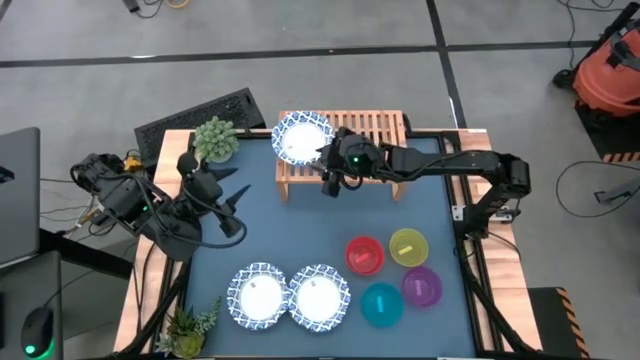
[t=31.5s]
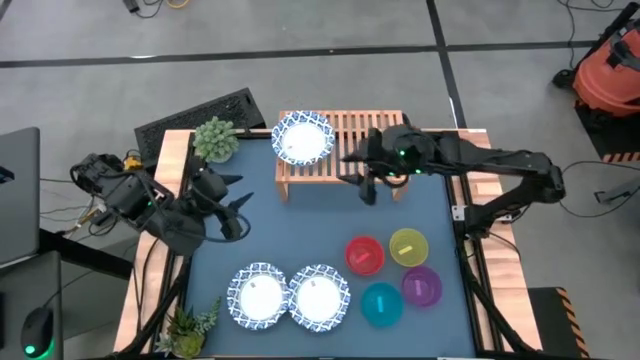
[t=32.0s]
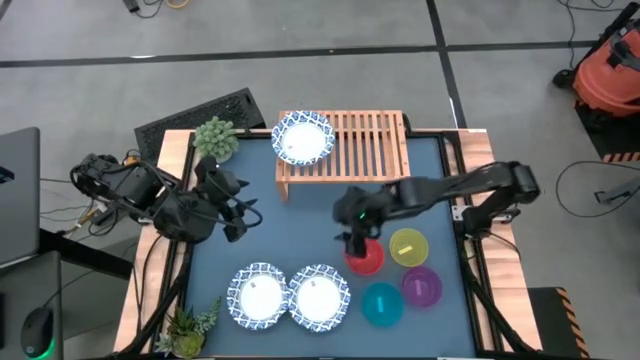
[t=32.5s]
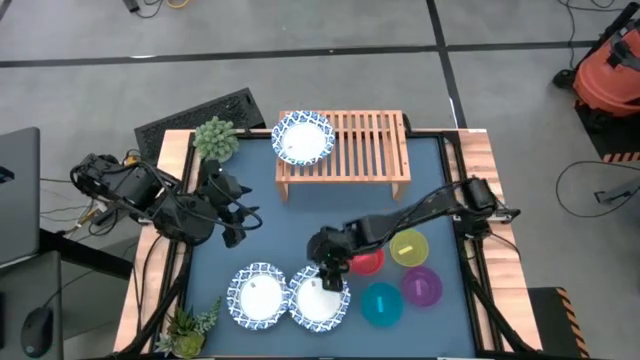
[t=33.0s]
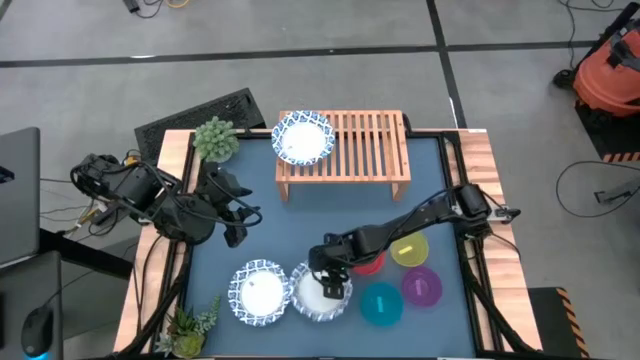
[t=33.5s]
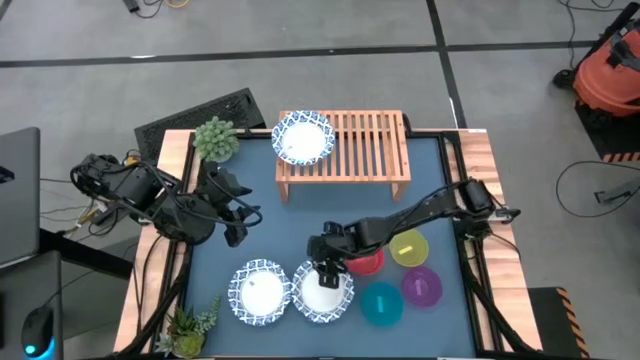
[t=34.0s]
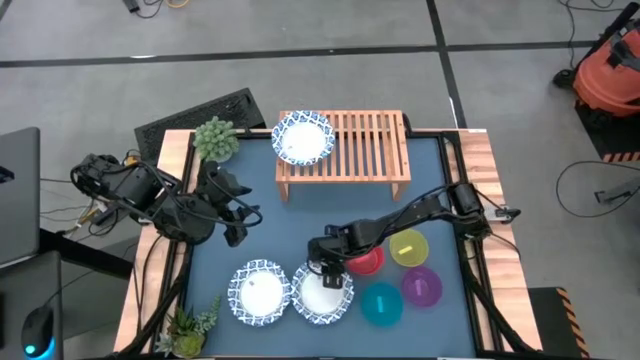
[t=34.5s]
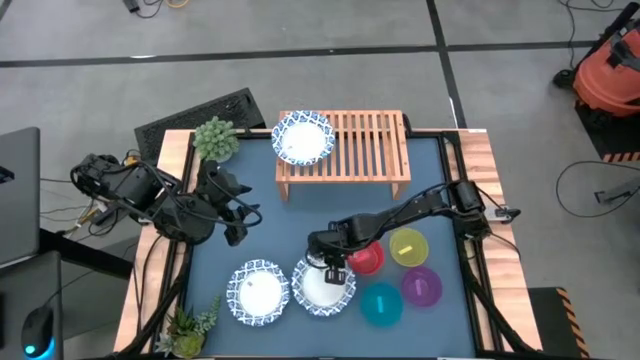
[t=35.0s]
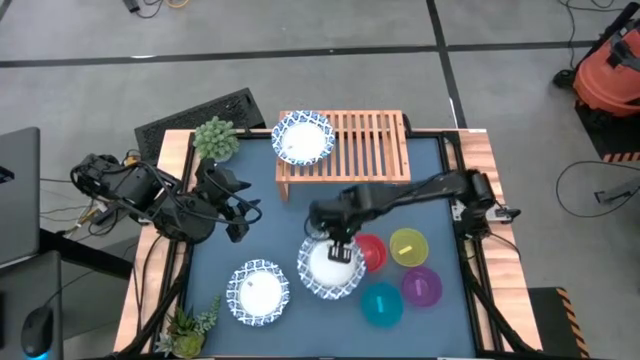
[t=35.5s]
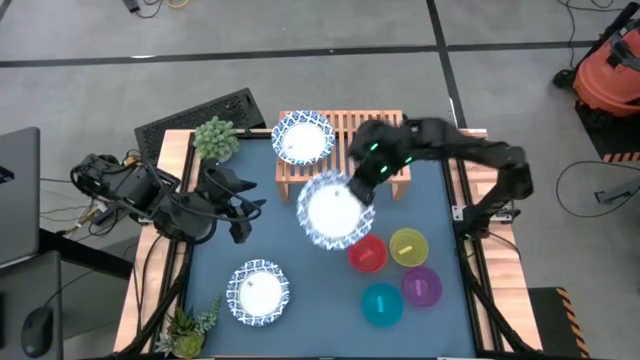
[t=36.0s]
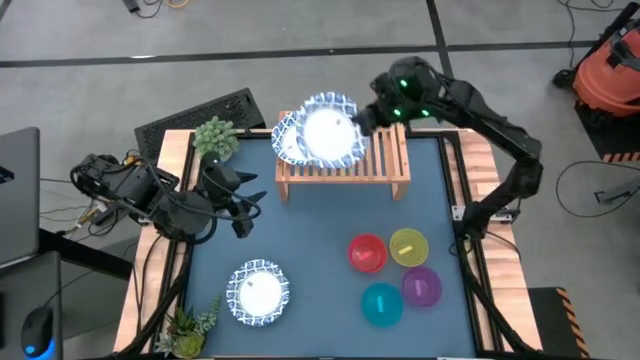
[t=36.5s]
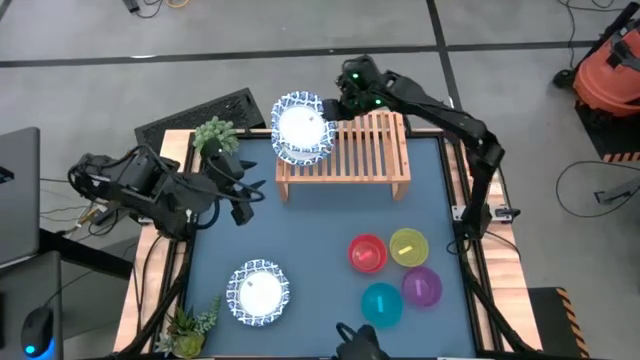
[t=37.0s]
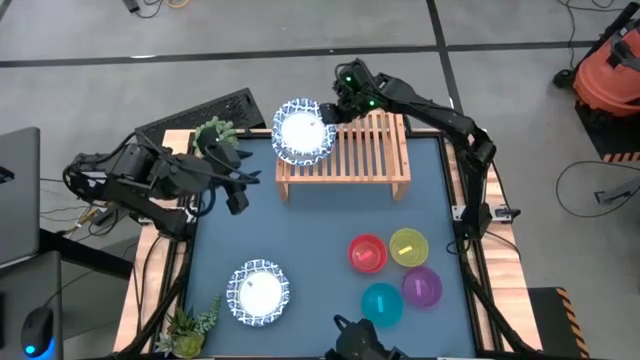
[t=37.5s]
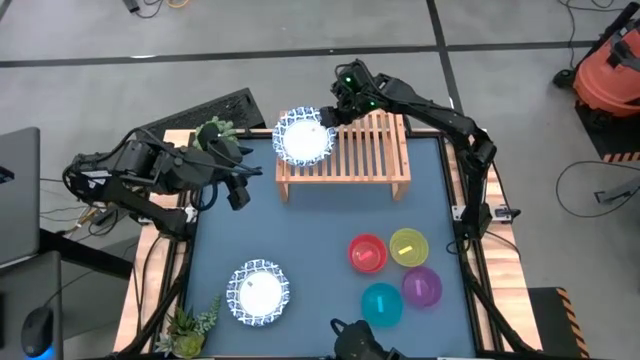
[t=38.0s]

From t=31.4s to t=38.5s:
Task: Place and stack bowls onto a shelf
Stack the right patterned bowl on top of the white patterned bowl on the shelf

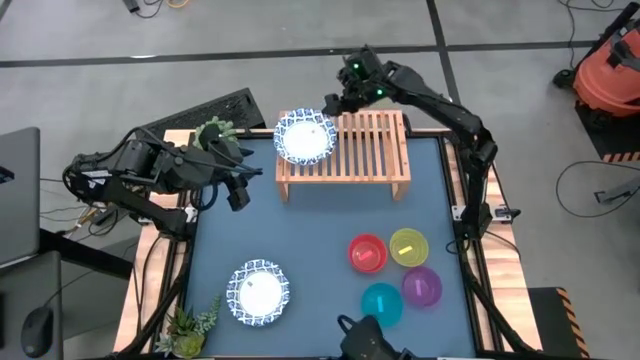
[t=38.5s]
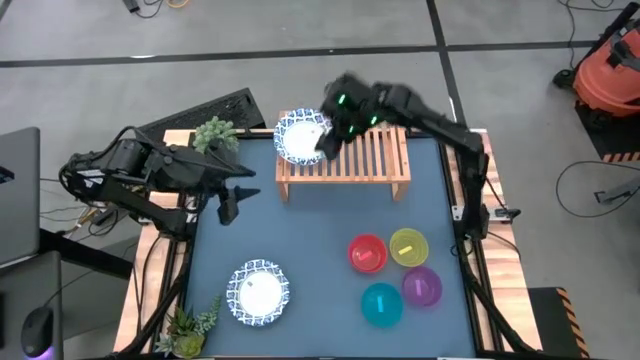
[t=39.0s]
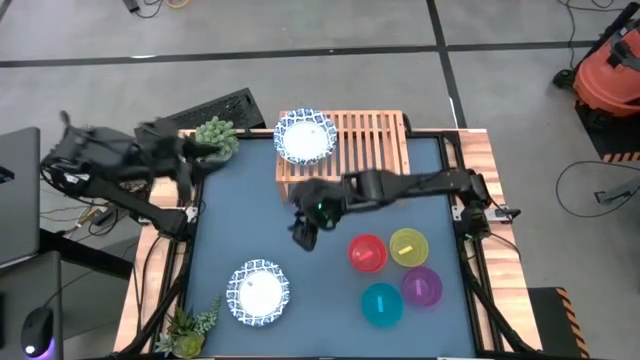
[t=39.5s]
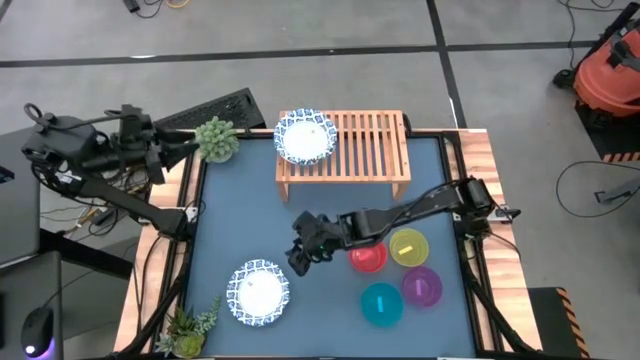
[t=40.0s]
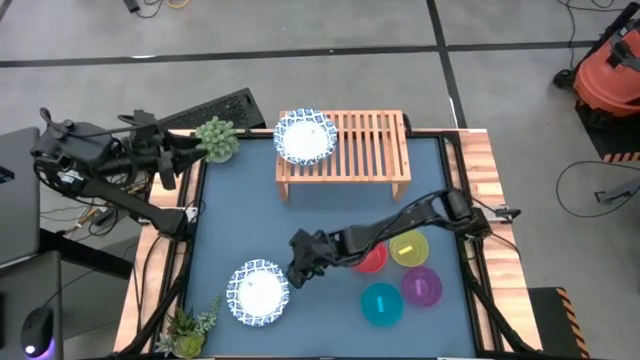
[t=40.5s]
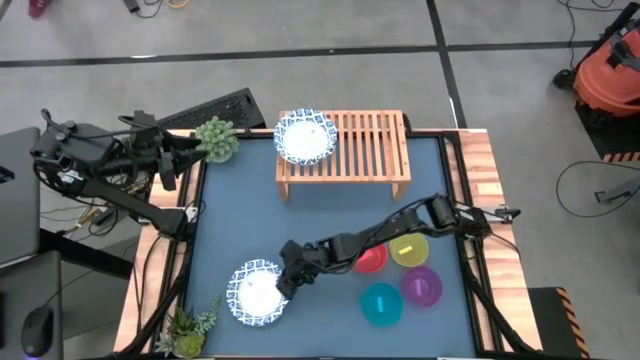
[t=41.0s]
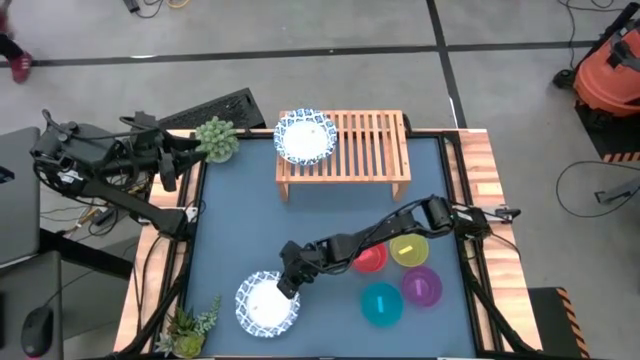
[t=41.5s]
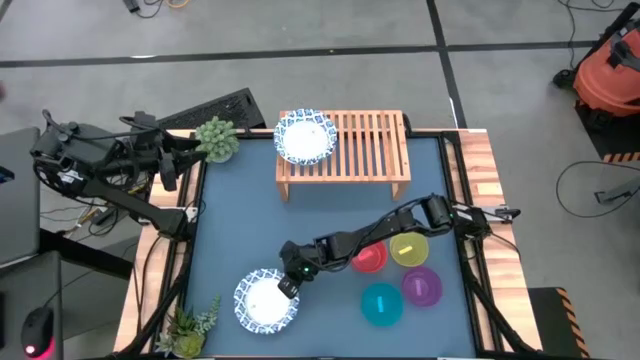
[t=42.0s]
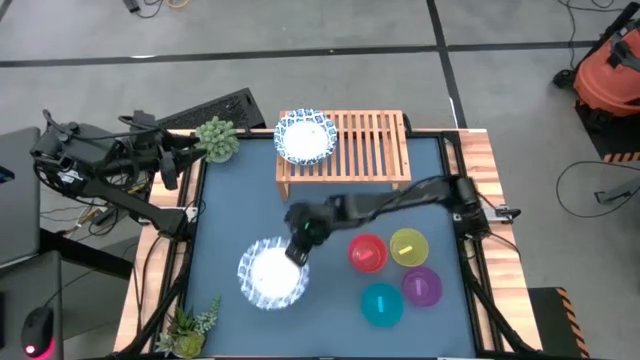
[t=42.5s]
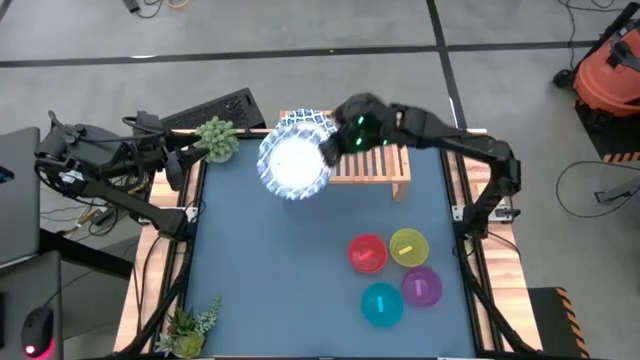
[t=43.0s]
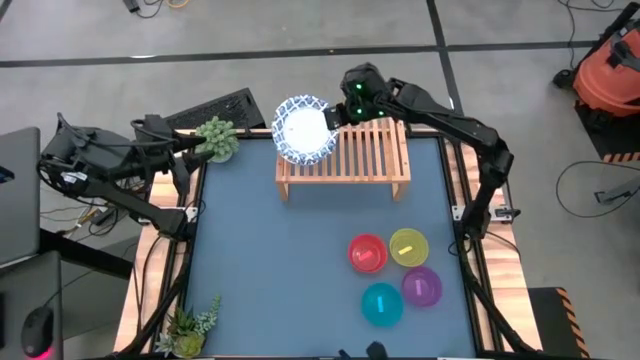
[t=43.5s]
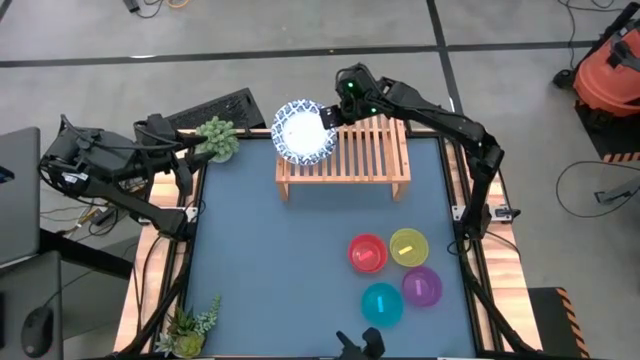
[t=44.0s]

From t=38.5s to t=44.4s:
Stack the white patterned bowl on top of the white patterned bowl on the shelf

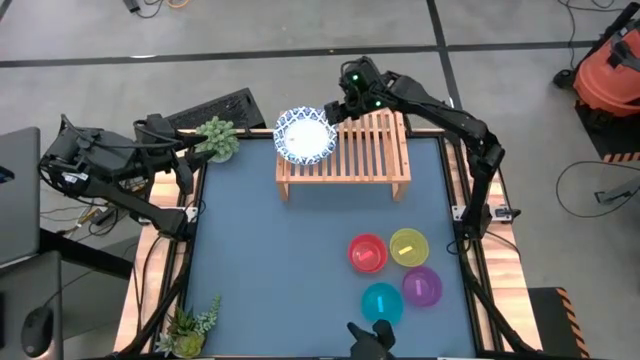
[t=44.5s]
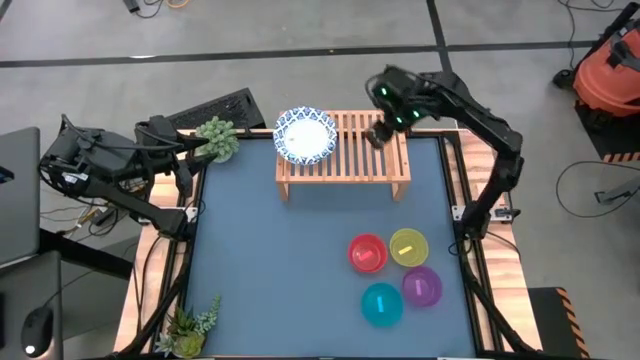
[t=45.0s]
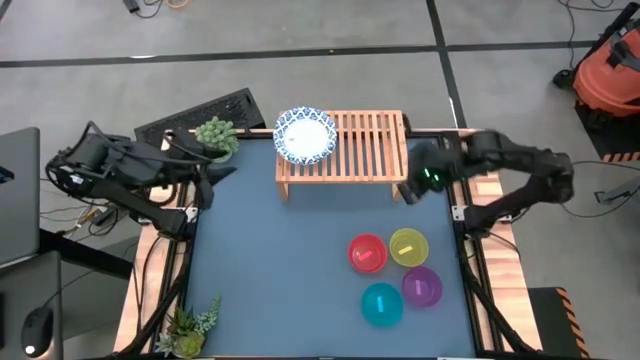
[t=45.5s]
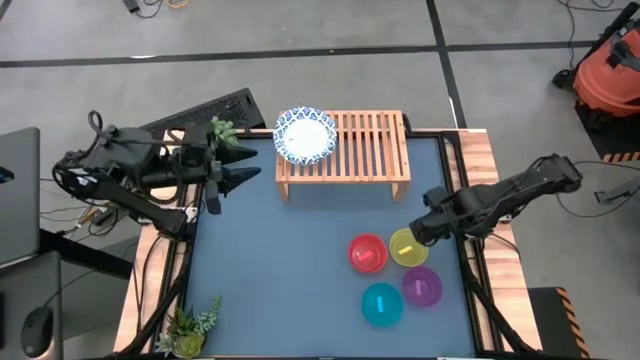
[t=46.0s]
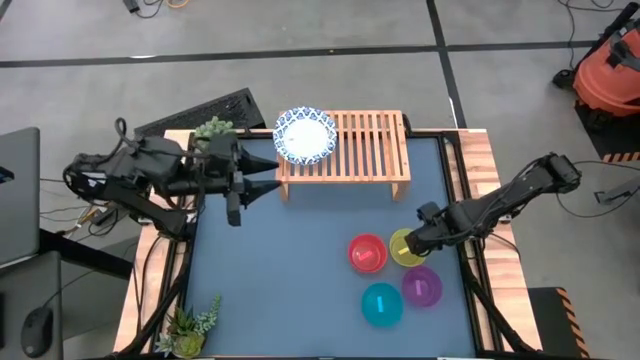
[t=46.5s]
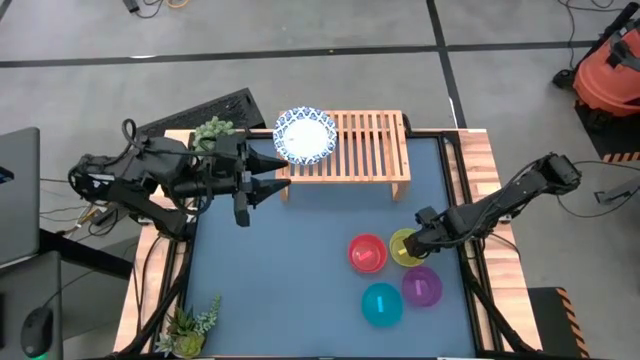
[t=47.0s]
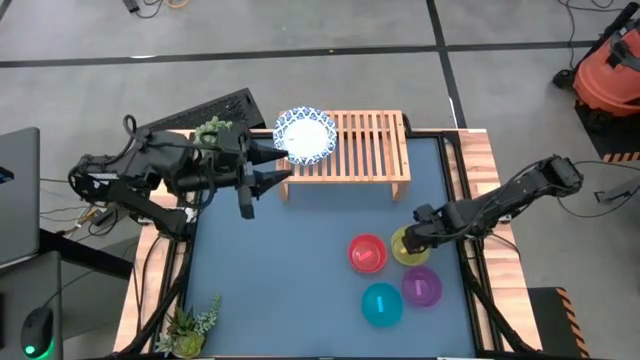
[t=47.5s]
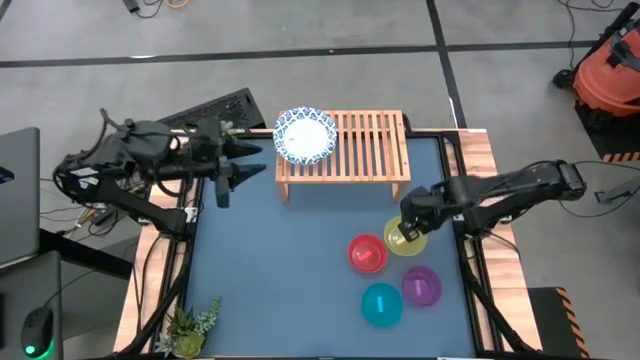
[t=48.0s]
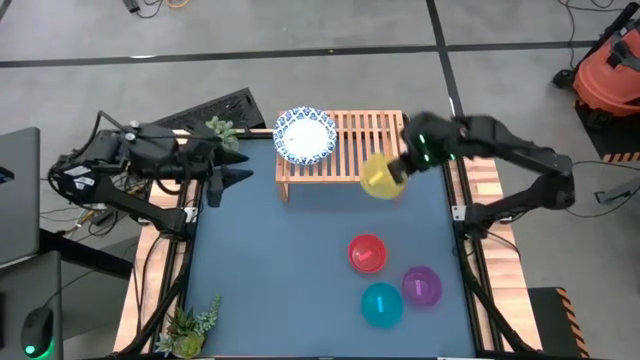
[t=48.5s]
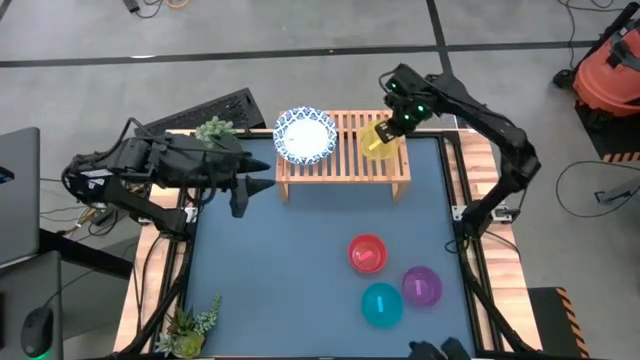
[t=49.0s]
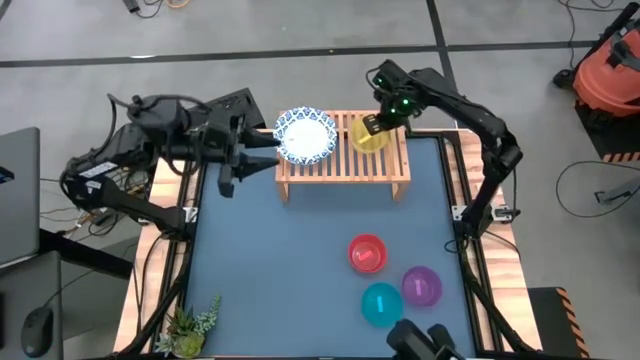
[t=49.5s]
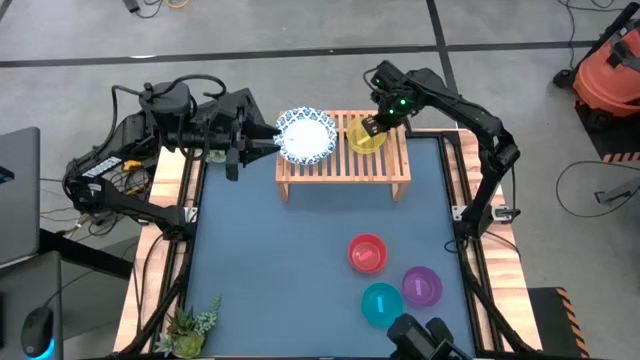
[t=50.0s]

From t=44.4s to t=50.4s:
Put the yellow bowl on the shelf
